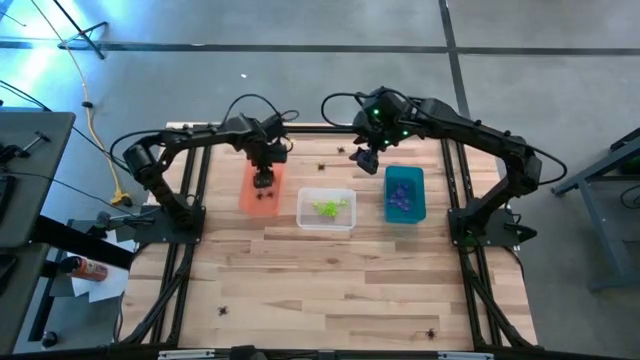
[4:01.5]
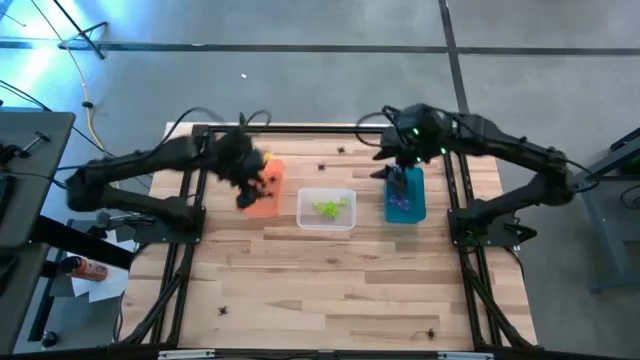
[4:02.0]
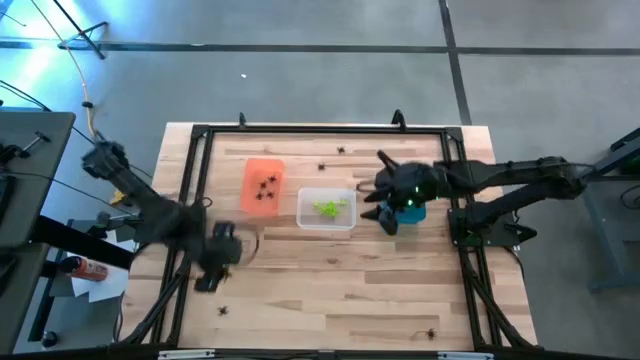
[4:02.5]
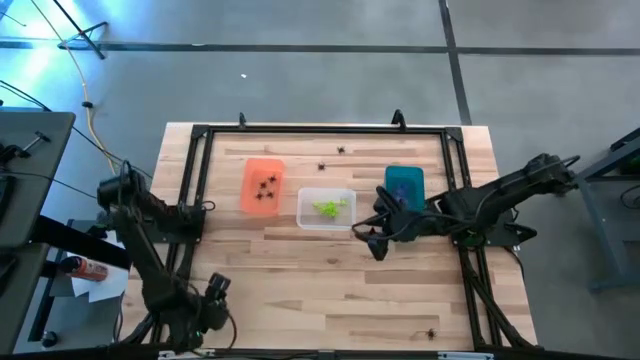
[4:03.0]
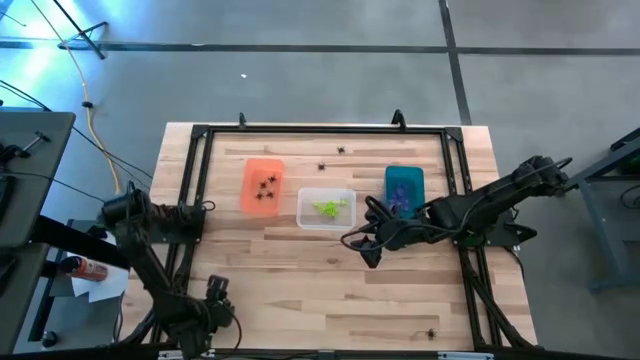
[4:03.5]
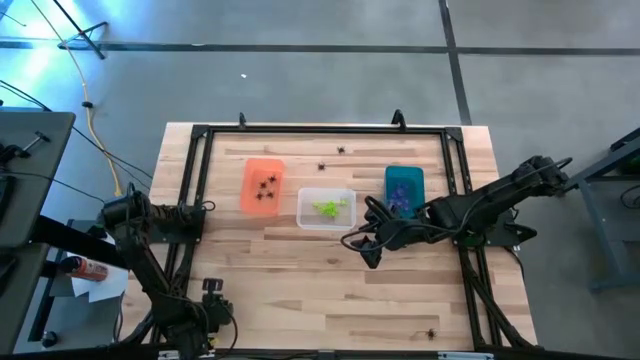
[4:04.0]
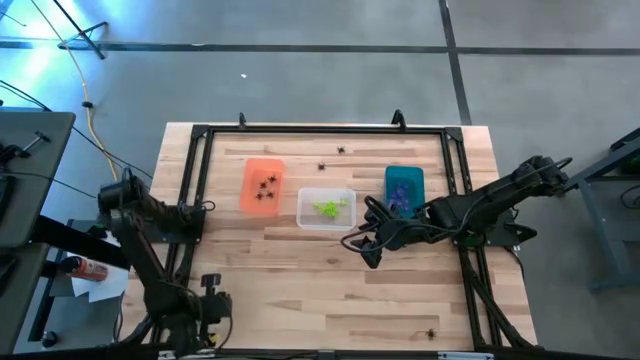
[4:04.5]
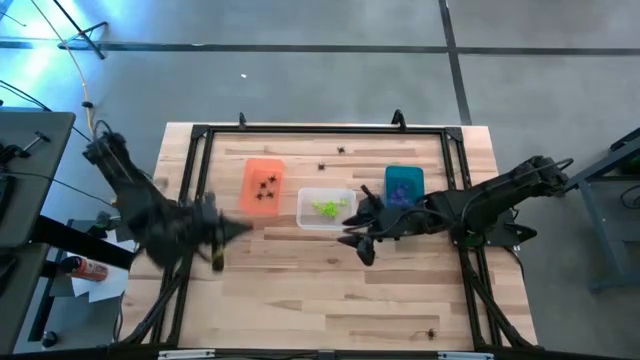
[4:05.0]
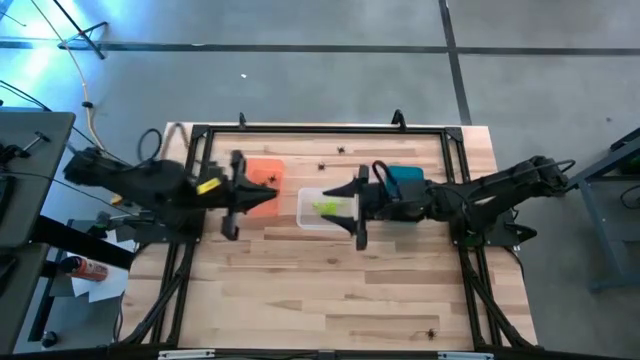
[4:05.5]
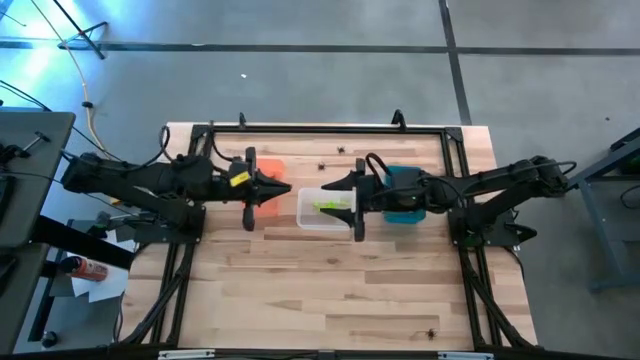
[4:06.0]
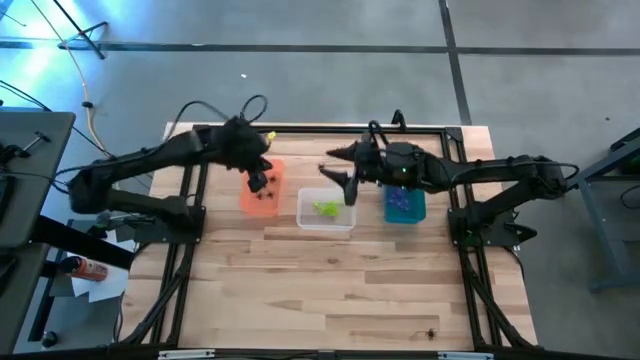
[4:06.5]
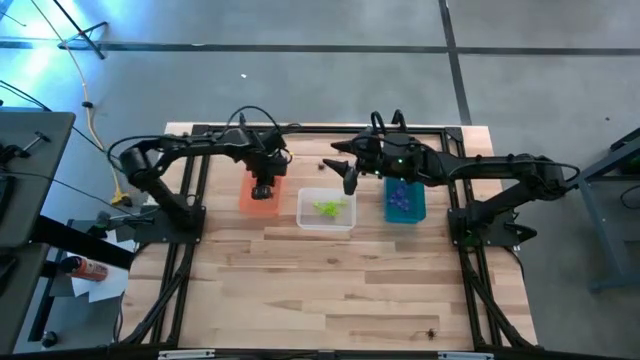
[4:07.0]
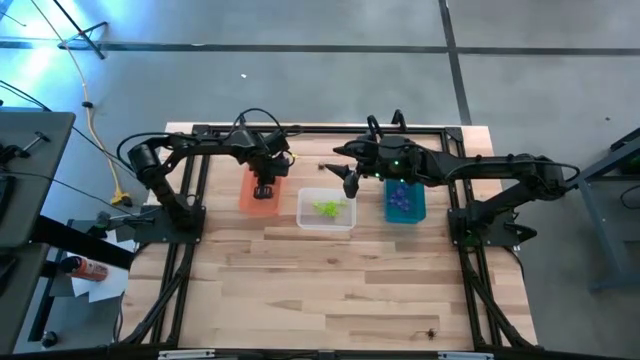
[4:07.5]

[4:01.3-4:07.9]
Task: Sort Halloween decoration
Put the black spider toy into the orange bin

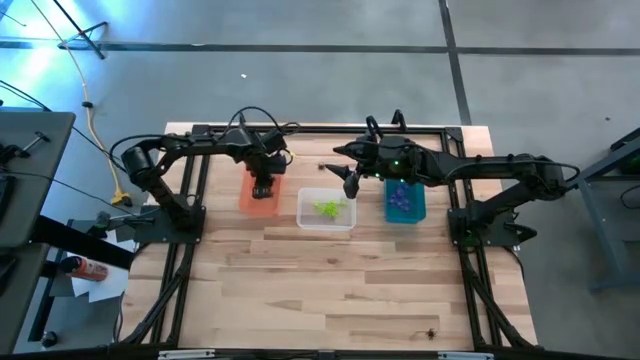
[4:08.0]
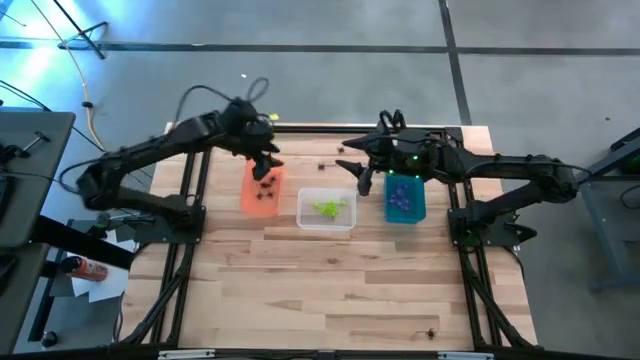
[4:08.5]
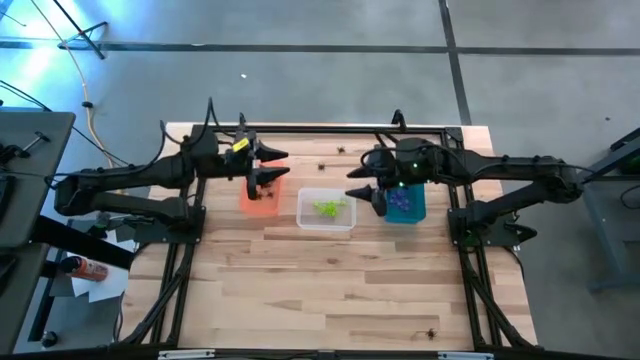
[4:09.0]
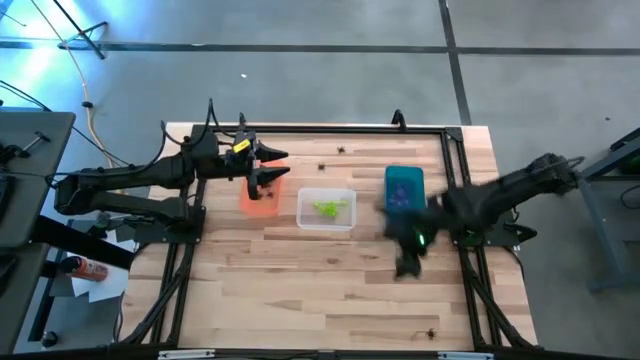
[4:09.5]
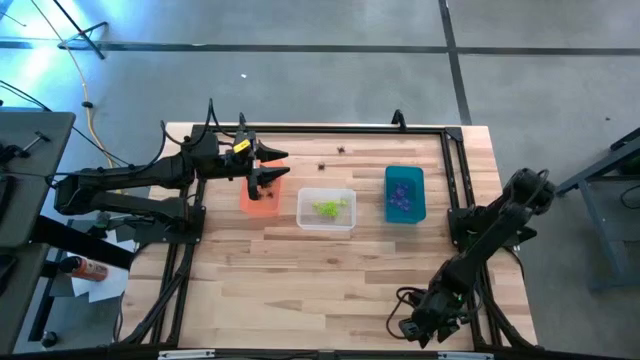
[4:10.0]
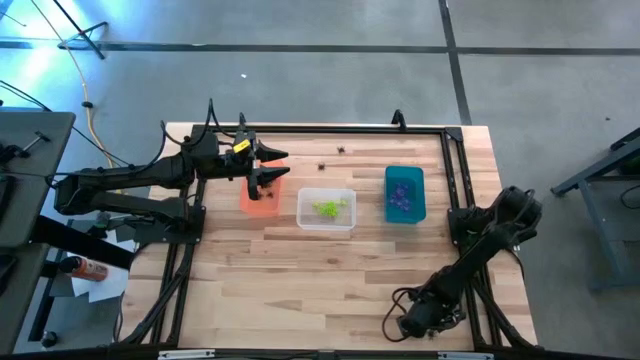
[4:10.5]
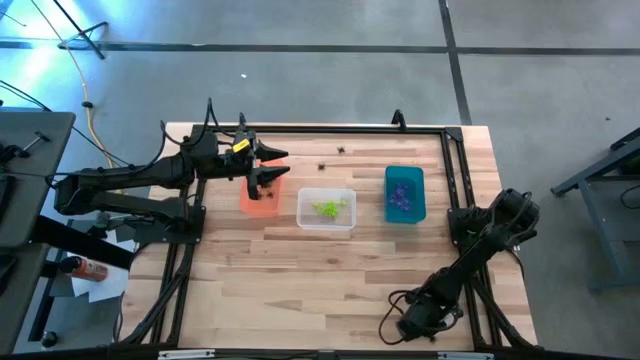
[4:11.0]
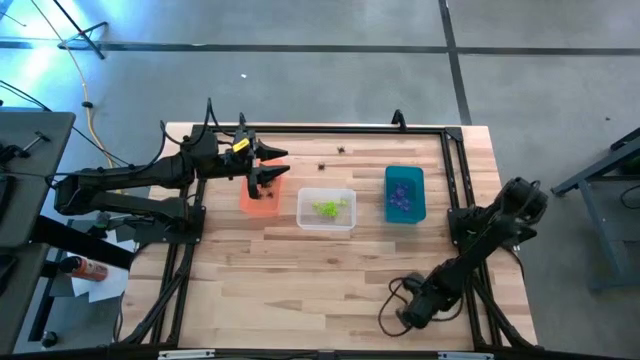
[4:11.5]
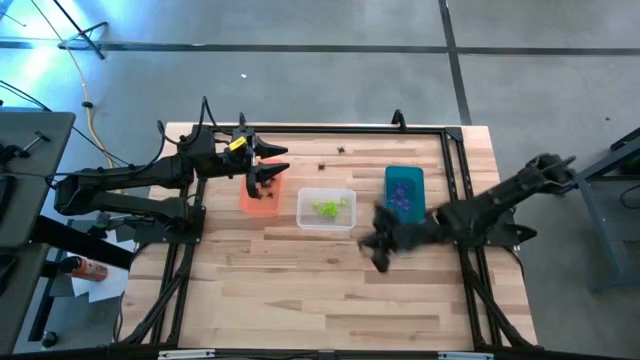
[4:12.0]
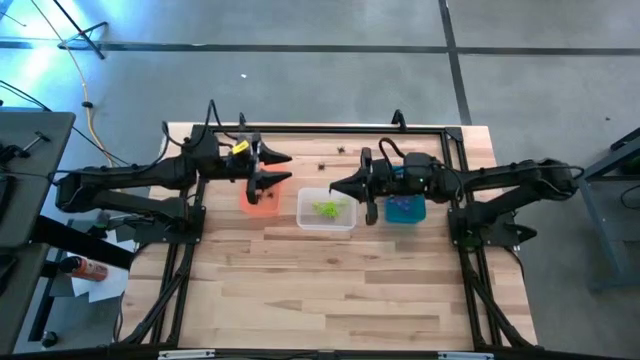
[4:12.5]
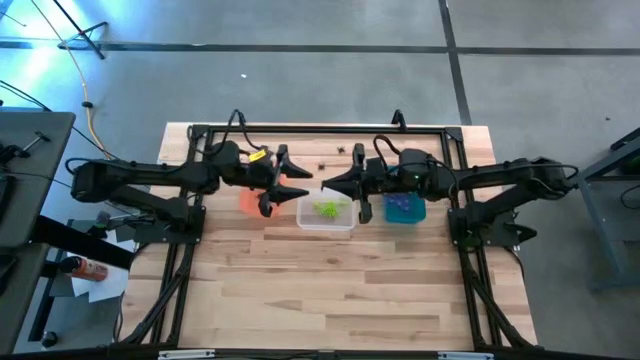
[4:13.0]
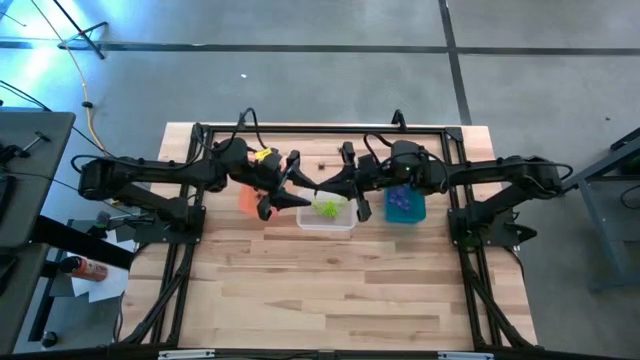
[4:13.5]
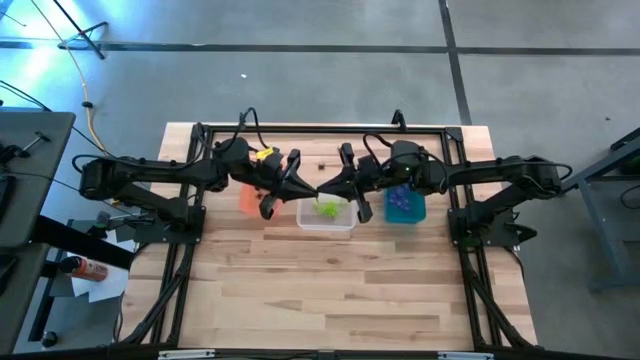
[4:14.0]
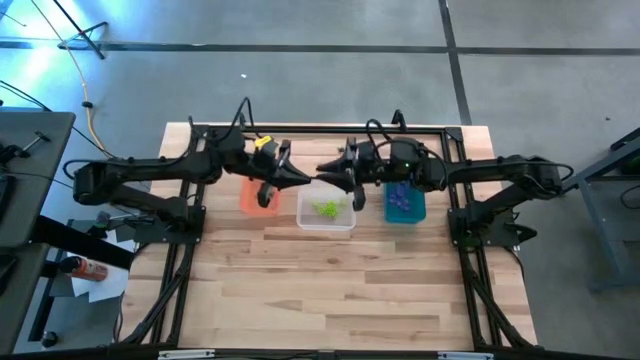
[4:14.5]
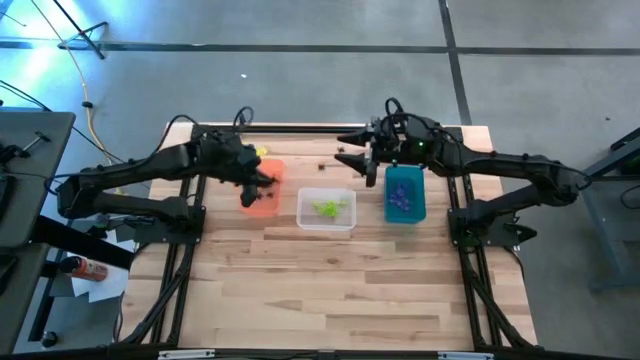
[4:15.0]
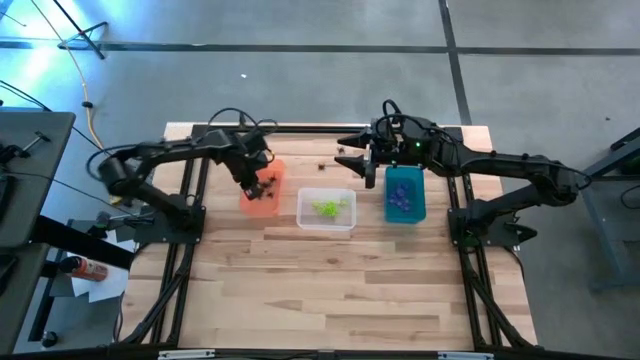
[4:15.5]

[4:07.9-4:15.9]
Put the black spider toy into the orange bin

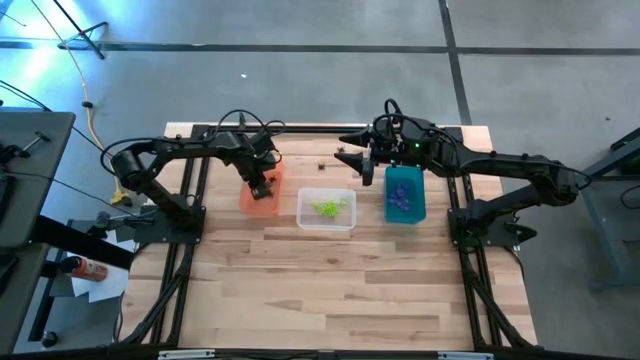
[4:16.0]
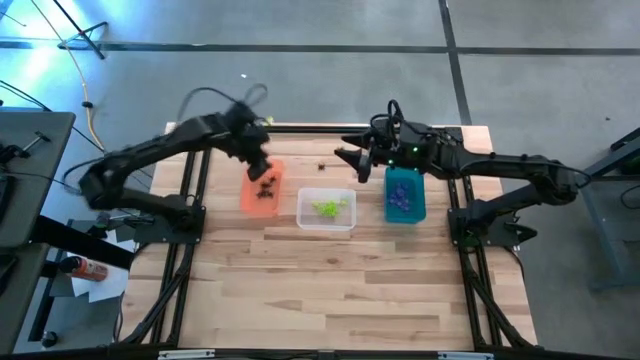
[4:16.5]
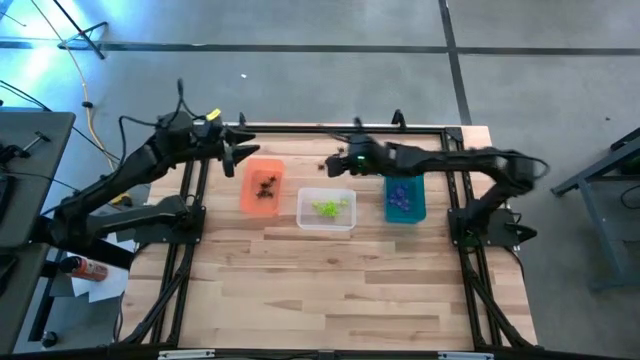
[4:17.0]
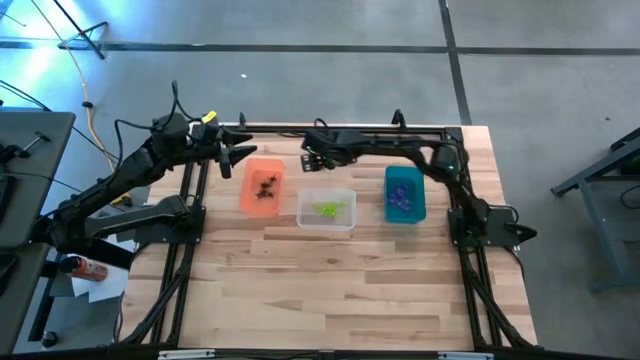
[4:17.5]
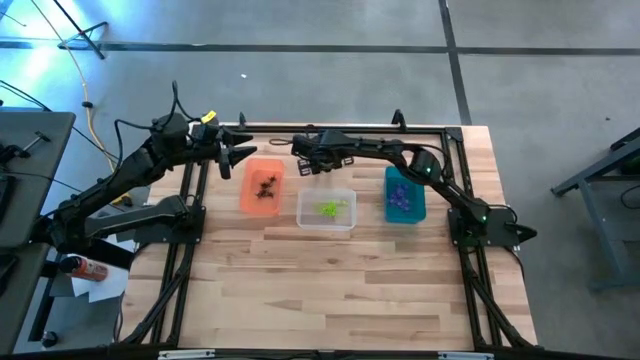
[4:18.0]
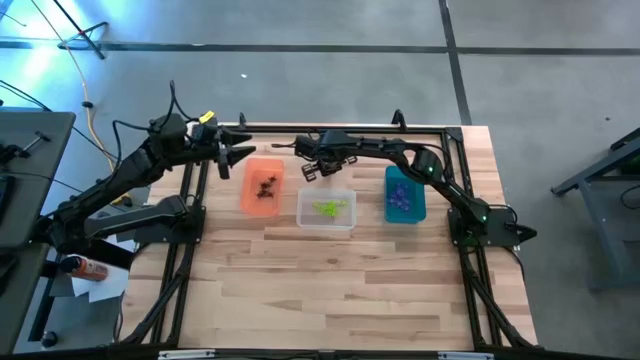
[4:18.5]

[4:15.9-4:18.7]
Put the black spider toy into the orange bin

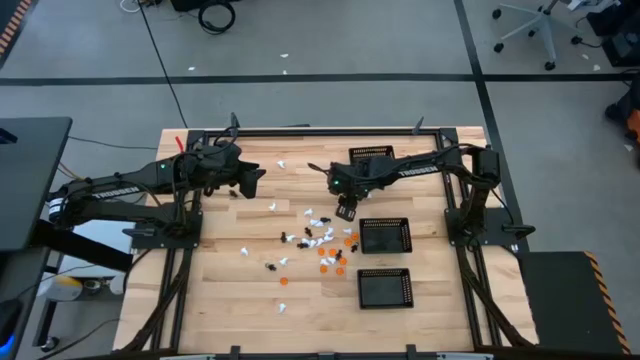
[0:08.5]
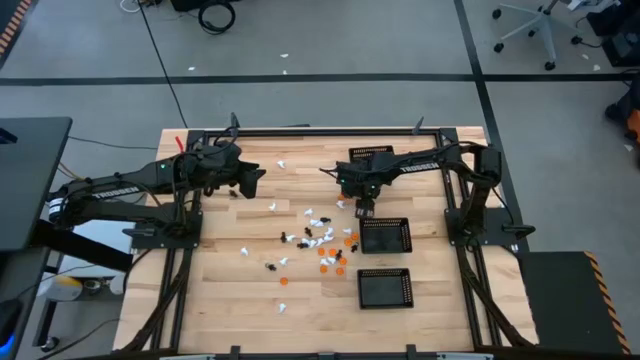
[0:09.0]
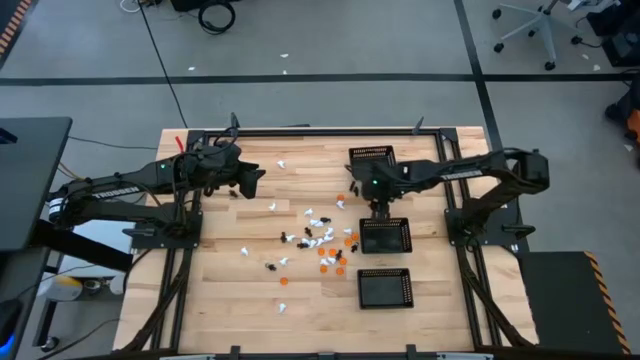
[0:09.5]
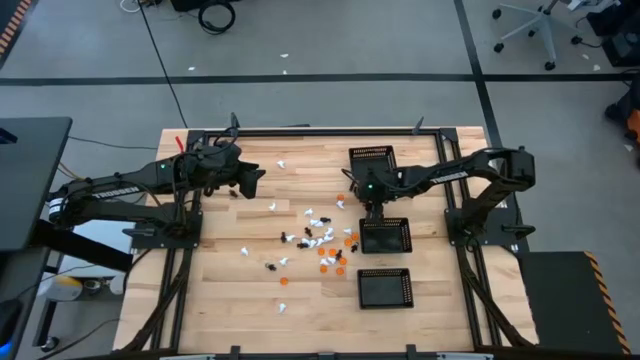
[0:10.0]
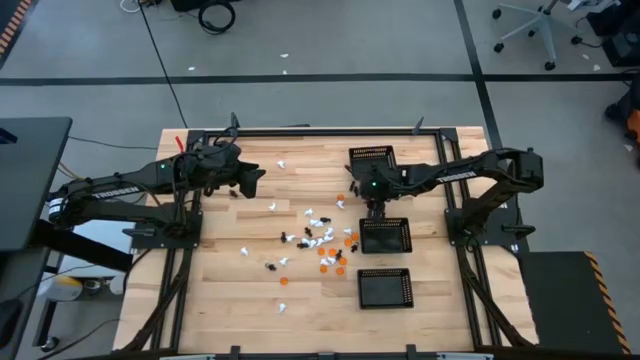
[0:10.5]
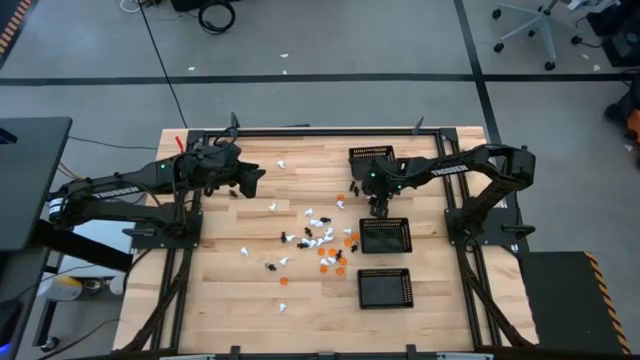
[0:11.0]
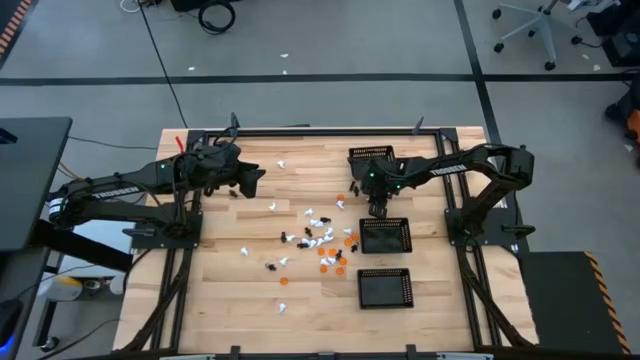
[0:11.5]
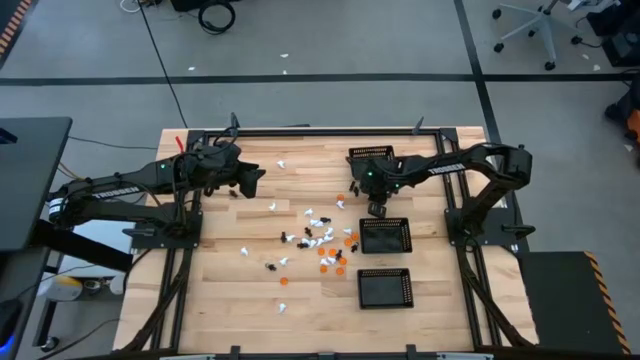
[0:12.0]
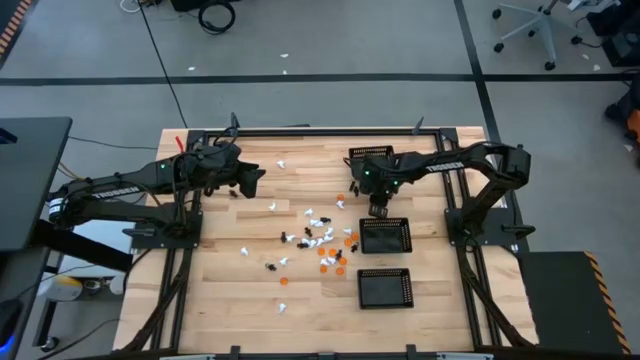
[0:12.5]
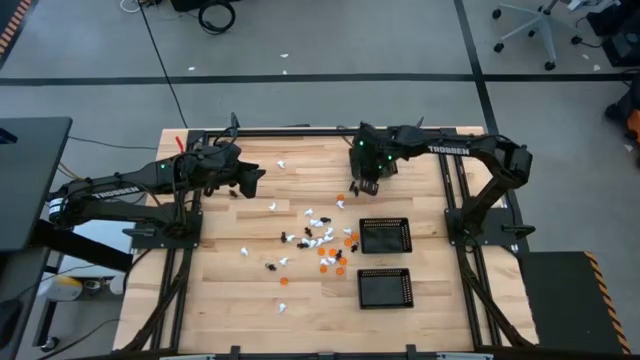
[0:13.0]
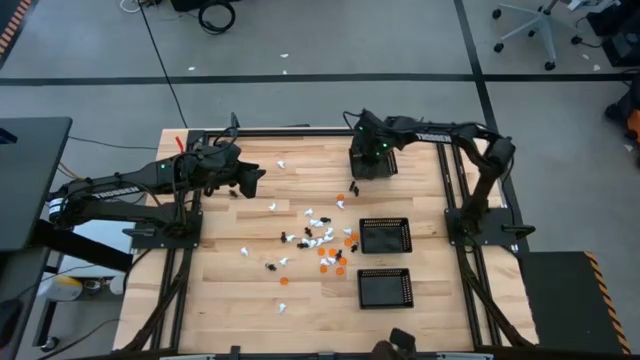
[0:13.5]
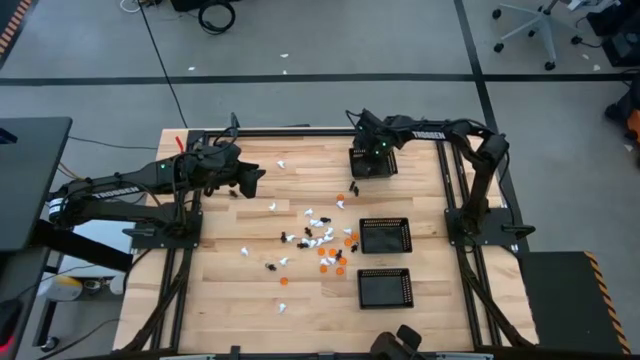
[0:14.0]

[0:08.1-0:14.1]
Task: Sort Halloween decoration
Put the white ghost toy into the top black bin
